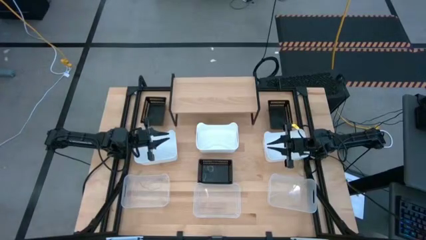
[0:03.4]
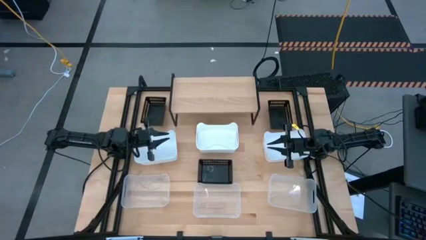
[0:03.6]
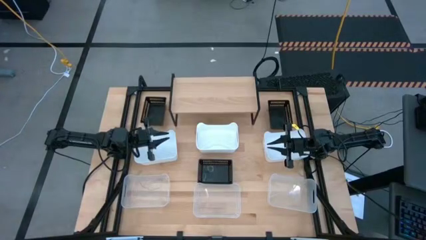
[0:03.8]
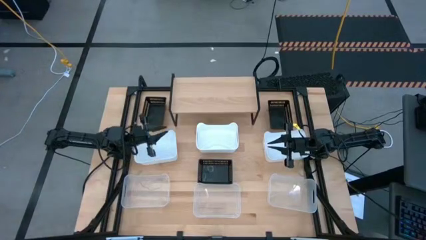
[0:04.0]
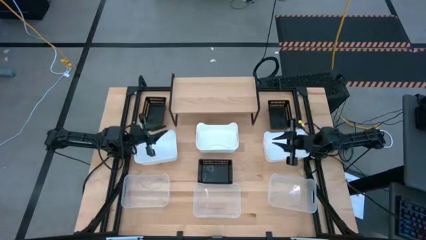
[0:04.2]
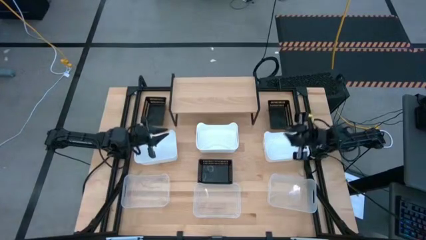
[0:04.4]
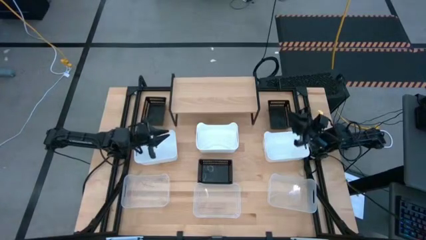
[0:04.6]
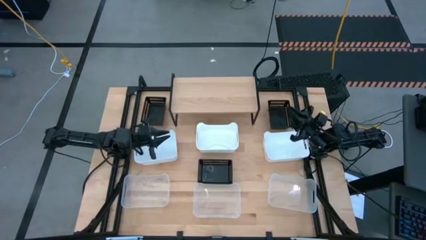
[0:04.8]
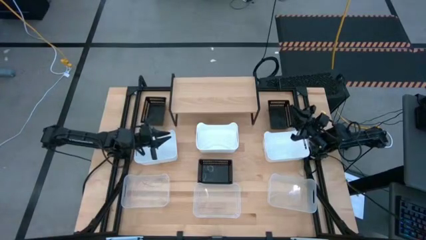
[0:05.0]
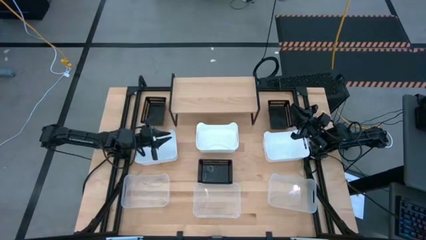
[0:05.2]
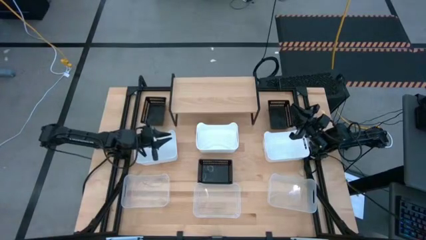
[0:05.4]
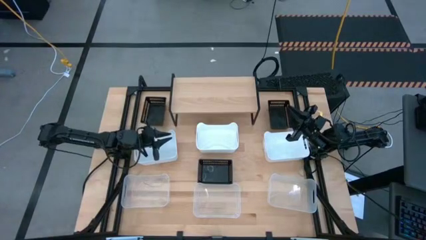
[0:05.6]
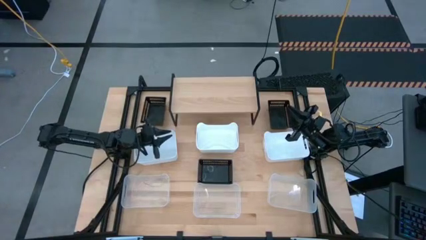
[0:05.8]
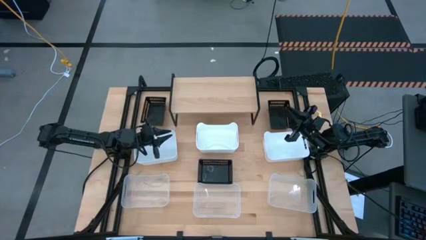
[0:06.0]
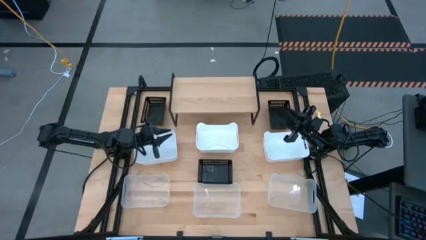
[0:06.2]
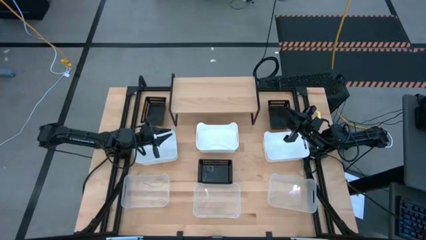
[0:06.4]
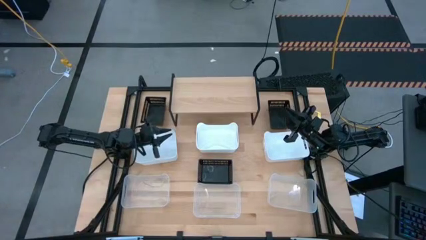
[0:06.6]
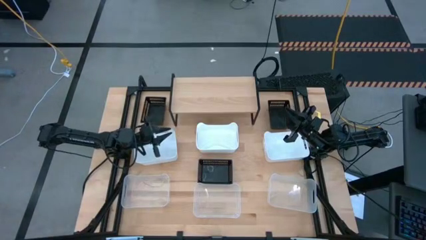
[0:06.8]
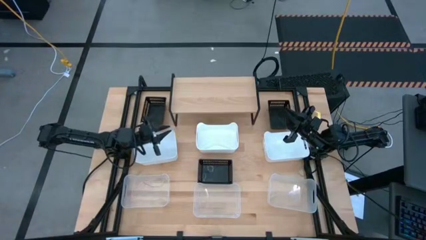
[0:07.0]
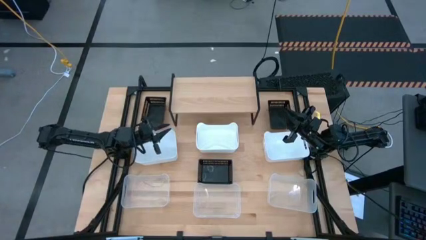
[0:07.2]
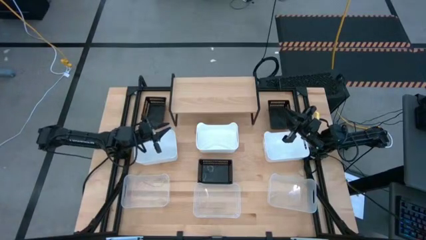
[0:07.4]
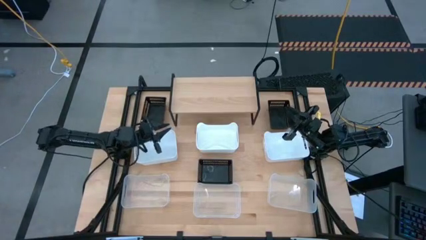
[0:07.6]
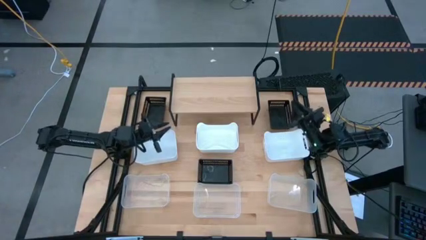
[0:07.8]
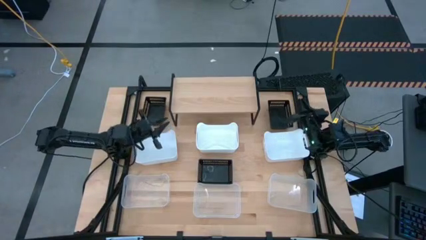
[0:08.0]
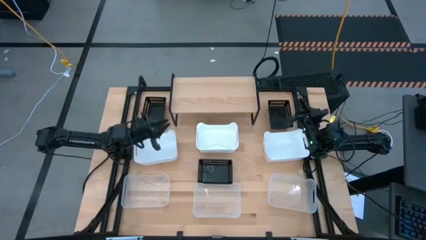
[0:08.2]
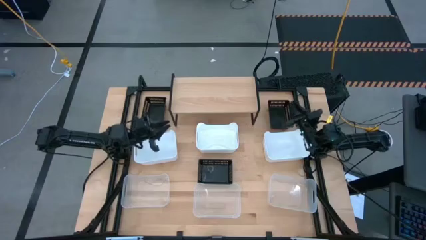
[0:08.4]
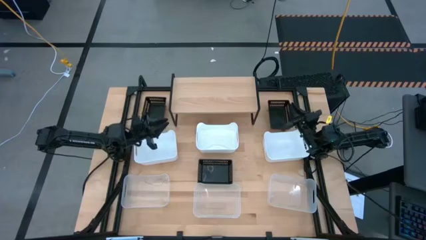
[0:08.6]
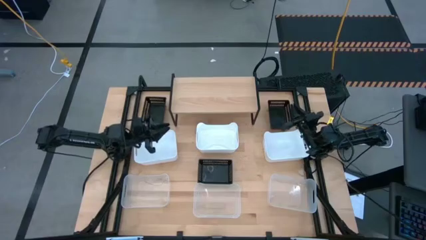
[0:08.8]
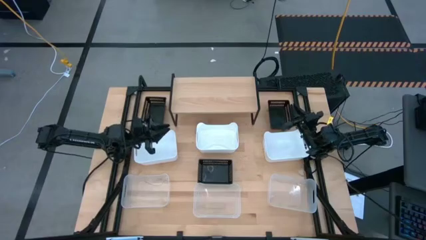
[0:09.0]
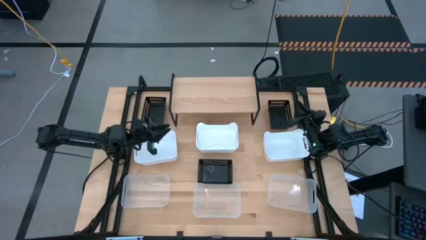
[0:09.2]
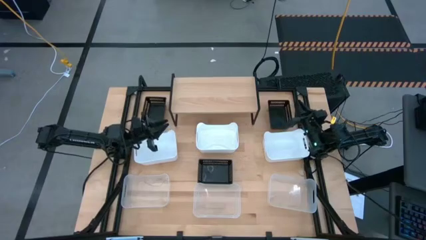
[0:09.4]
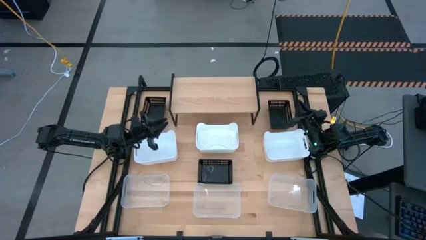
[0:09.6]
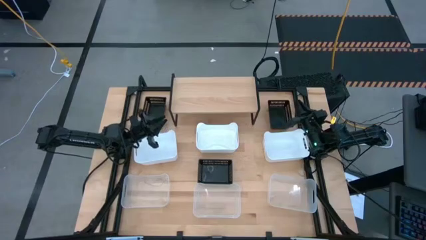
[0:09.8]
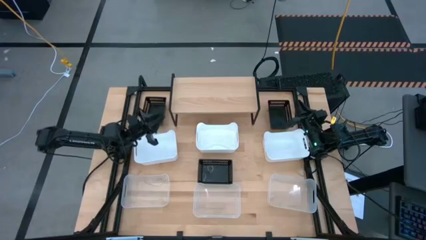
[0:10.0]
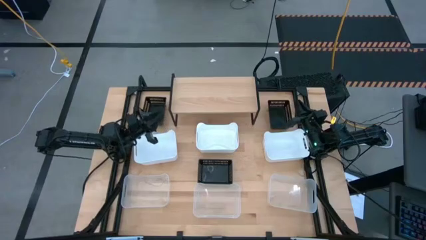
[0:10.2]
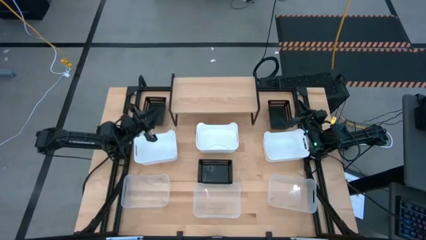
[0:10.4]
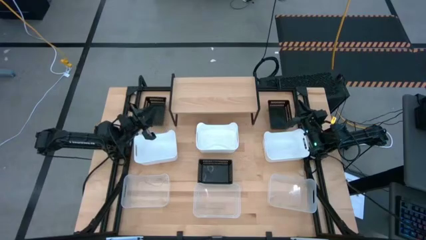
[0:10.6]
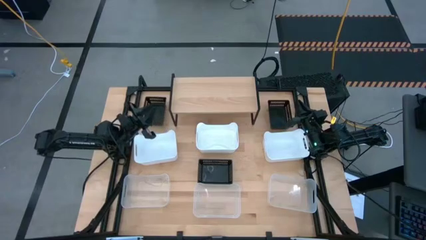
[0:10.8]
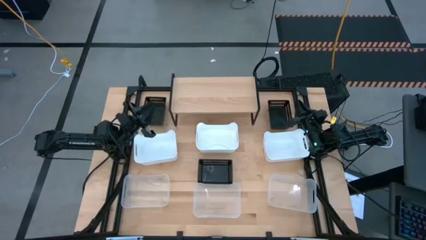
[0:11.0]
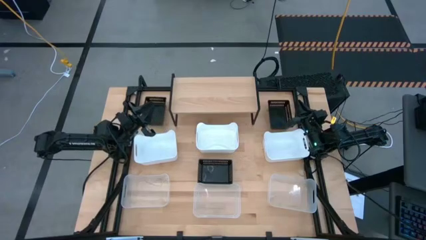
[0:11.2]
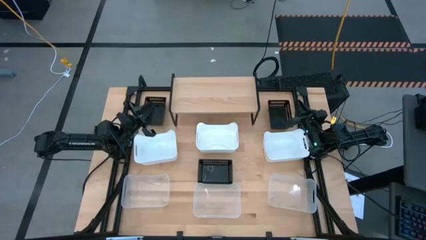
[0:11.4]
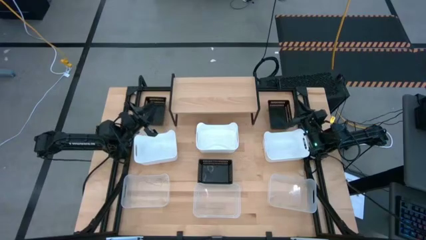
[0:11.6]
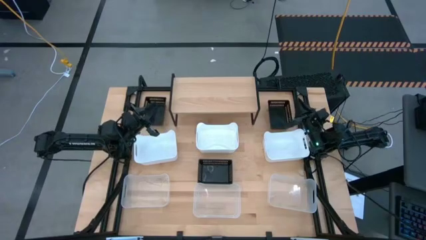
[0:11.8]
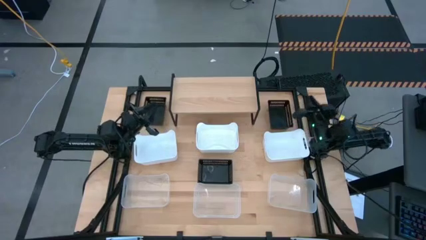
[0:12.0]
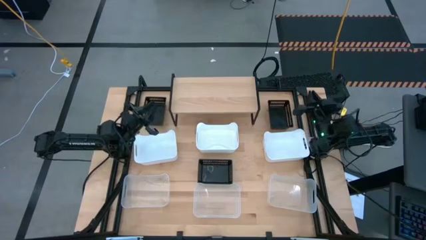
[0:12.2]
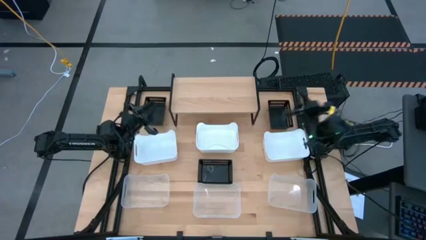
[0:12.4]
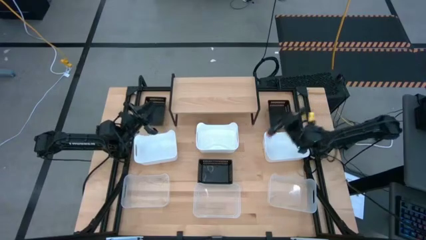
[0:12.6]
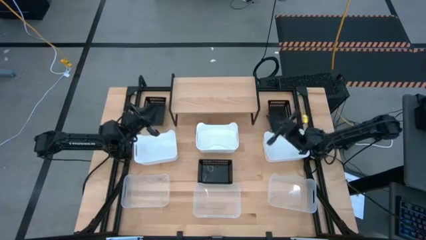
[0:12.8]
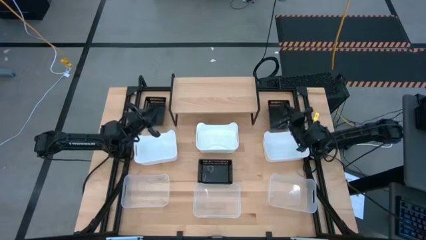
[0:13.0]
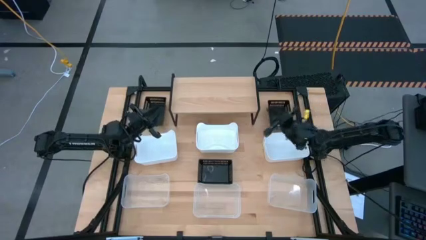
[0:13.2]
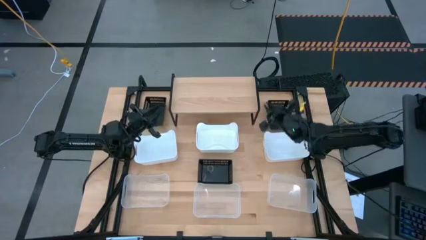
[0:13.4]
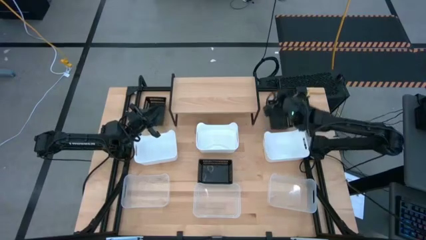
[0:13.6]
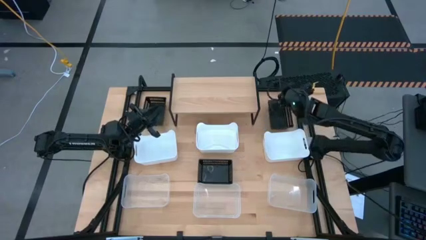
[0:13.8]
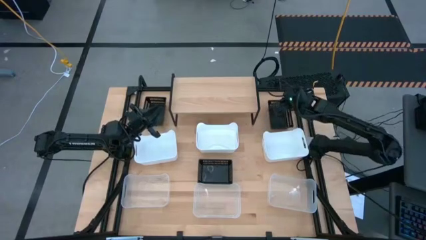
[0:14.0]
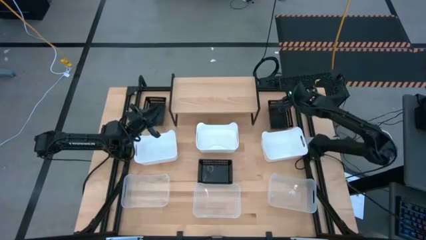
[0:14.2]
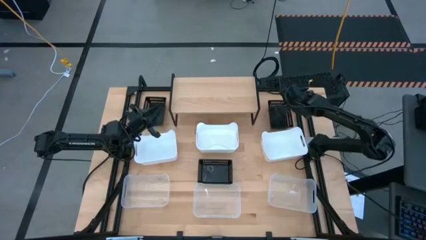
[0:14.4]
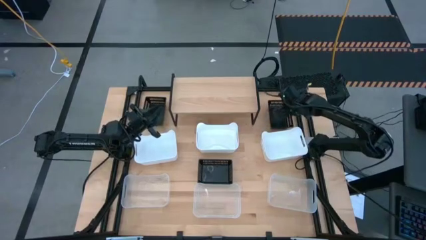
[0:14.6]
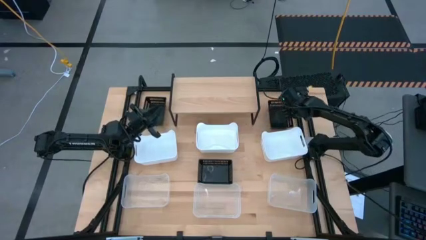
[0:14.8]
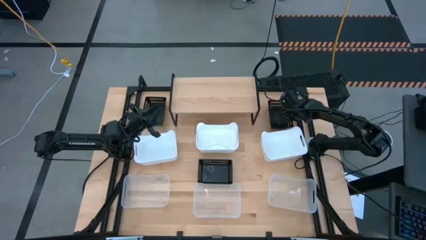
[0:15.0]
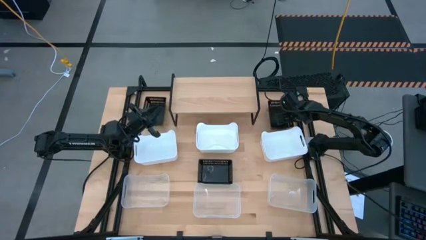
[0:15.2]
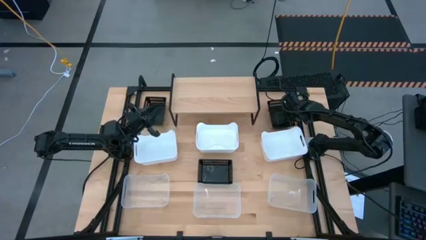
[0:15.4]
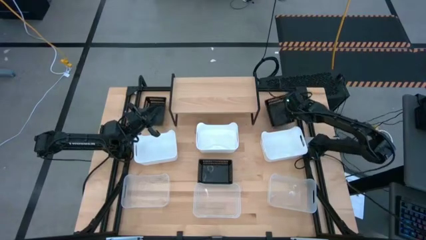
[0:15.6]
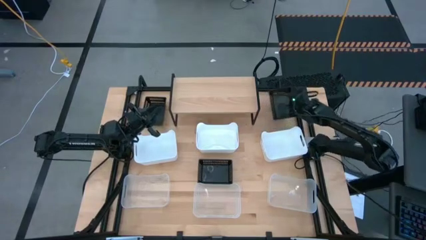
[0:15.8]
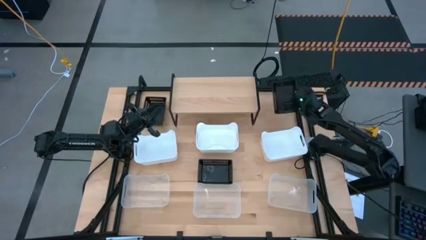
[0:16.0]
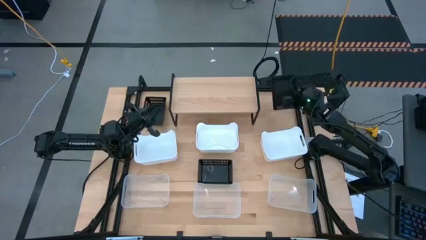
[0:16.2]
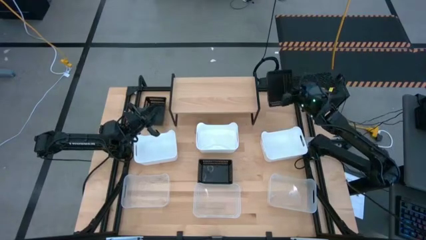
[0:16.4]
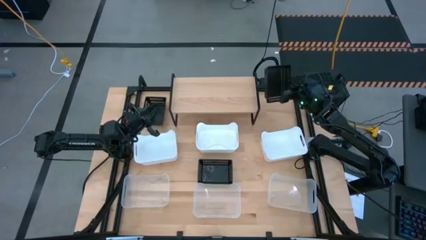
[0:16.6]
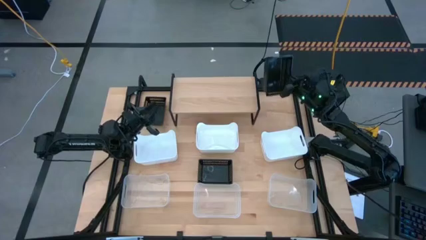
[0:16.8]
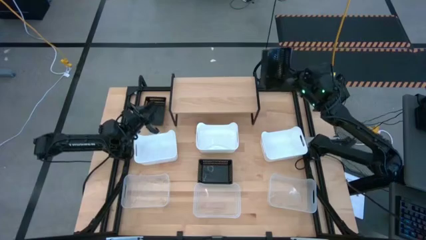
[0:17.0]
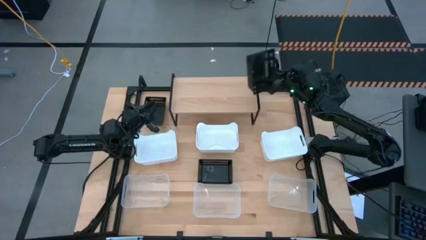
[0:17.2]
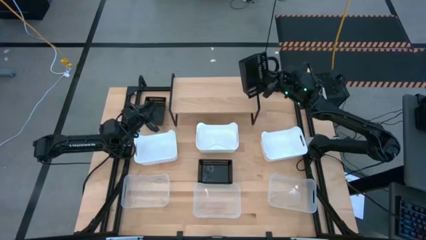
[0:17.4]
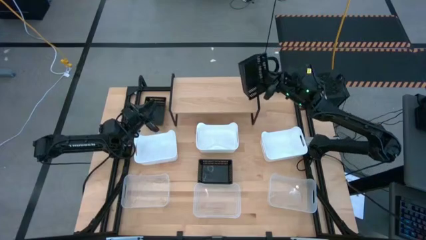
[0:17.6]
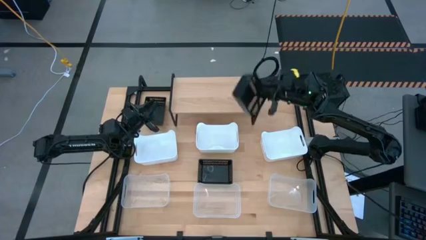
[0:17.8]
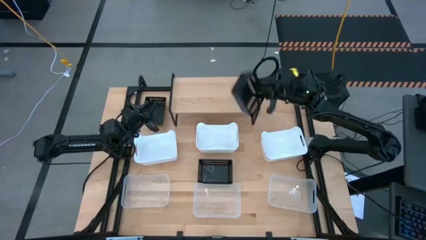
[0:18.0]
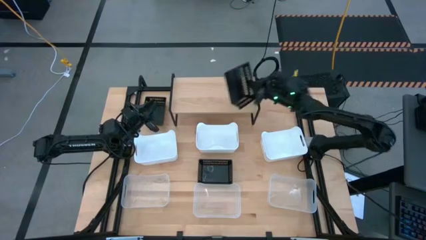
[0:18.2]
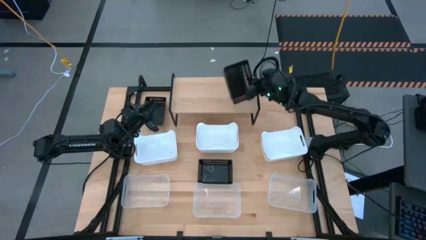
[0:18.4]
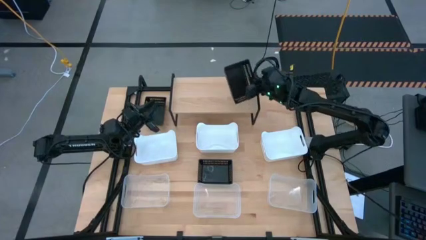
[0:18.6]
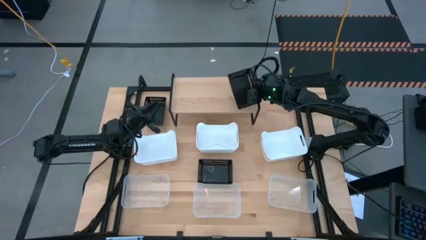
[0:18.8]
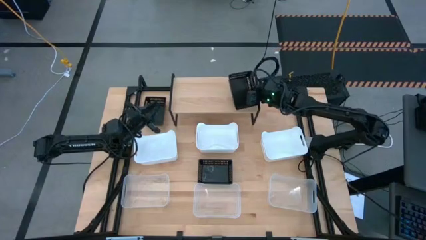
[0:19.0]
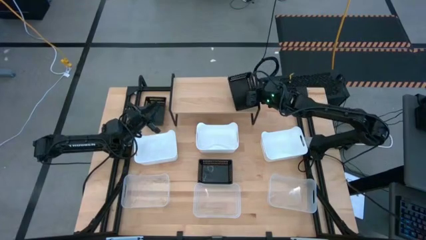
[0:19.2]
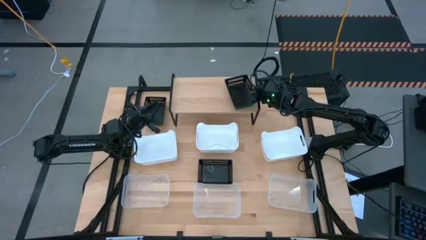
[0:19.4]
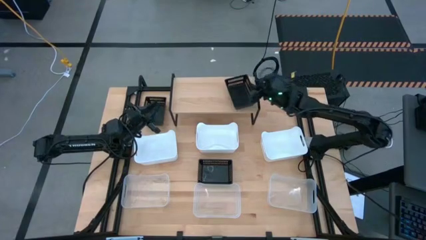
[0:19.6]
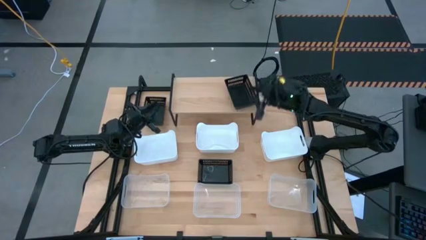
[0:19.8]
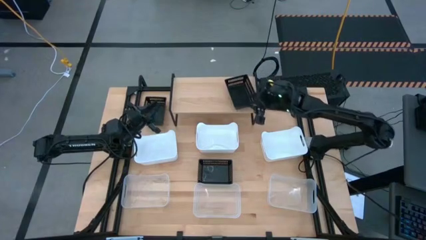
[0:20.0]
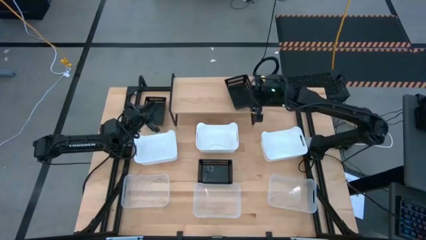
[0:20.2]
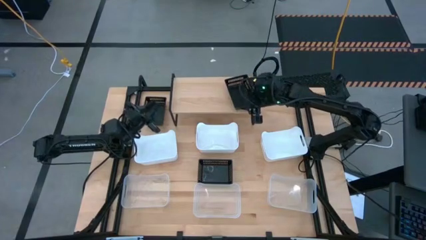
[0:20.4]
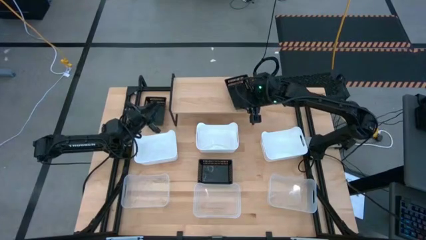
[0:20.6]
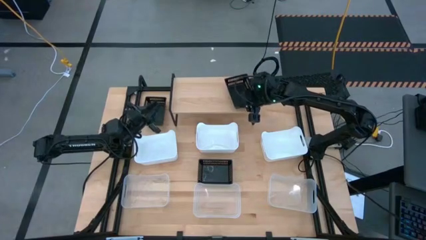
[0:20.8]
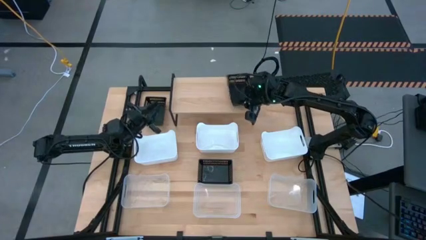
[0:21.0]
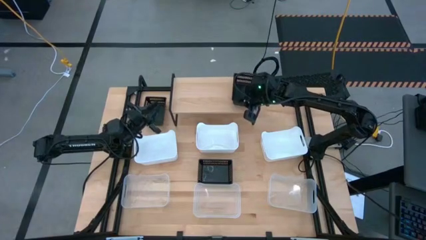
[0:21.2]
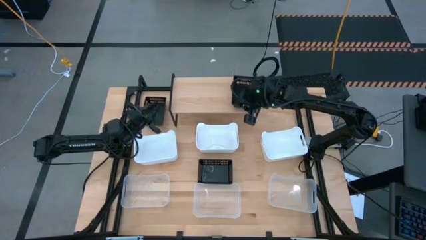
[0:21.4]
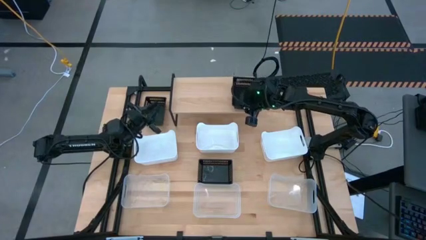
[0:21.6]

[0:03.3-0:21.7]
Task: Stack baskets on shelf by color
Put the top right black bin on the shelf
